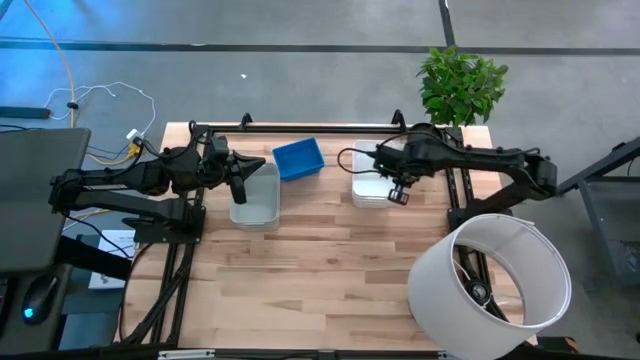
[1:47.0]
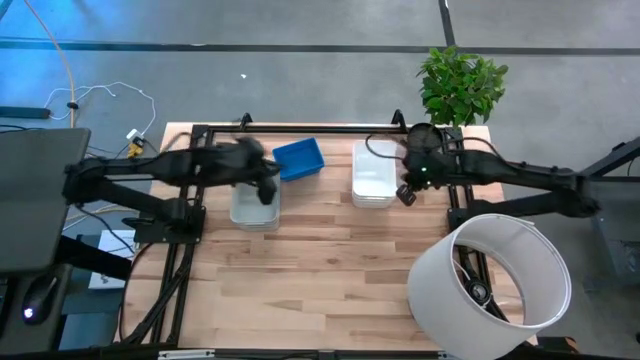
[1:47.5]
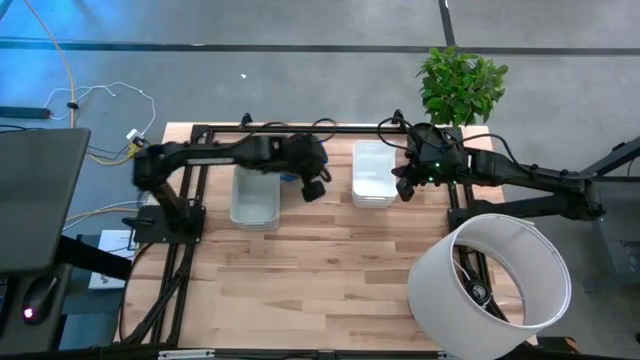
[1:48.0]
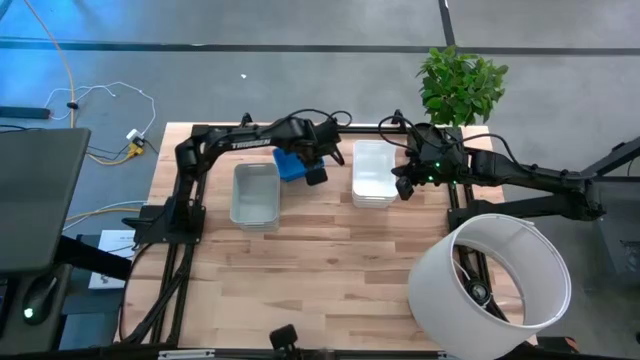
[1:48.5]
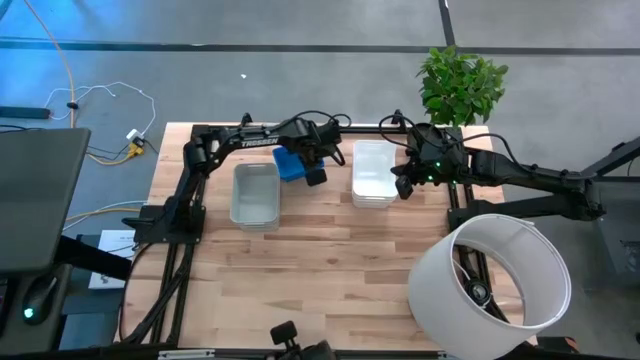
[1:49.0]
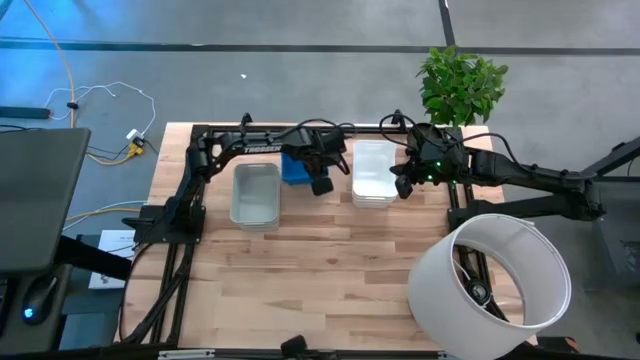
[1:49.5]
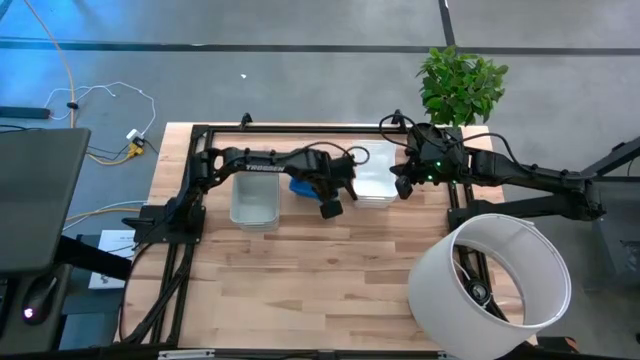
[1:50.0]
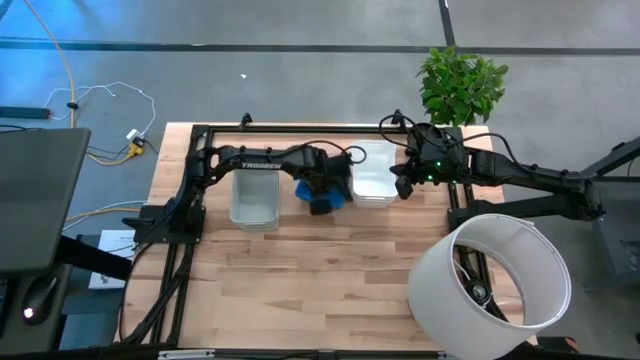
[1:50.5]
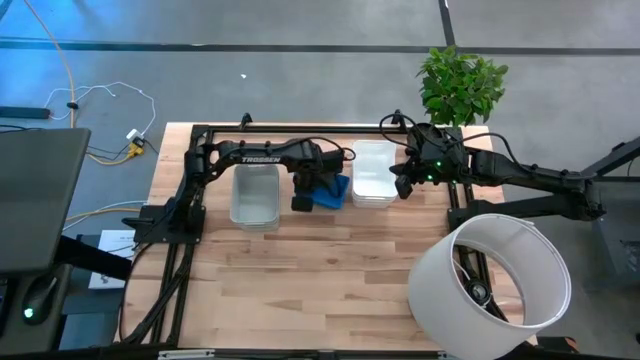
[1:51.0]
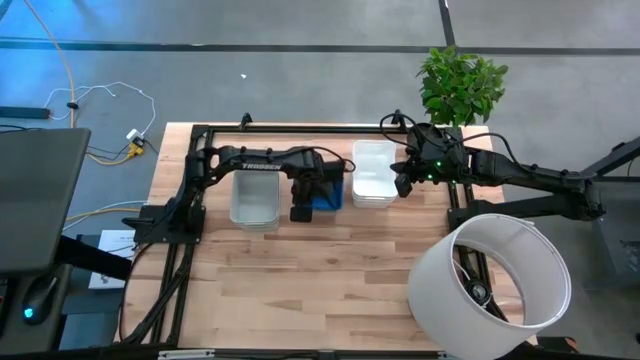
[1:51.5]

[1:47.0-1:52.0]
Adjust the blue bins

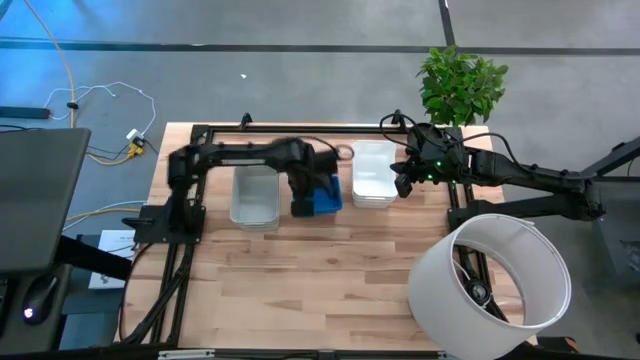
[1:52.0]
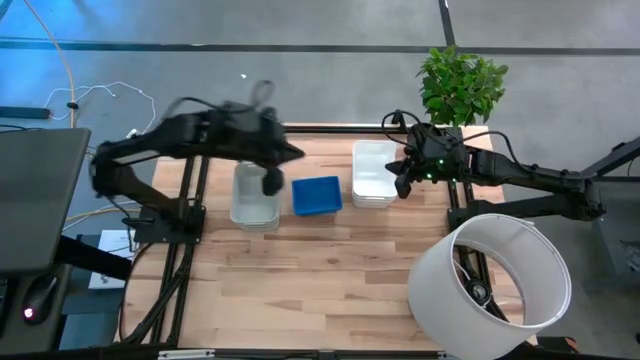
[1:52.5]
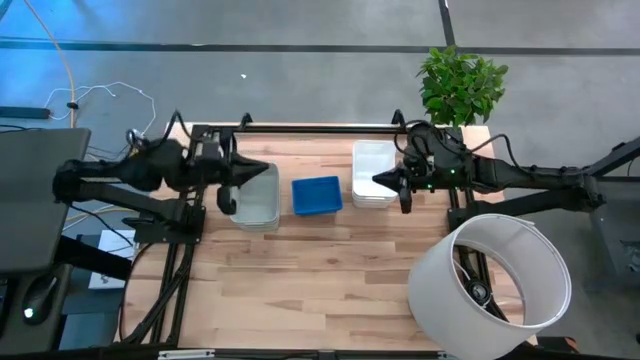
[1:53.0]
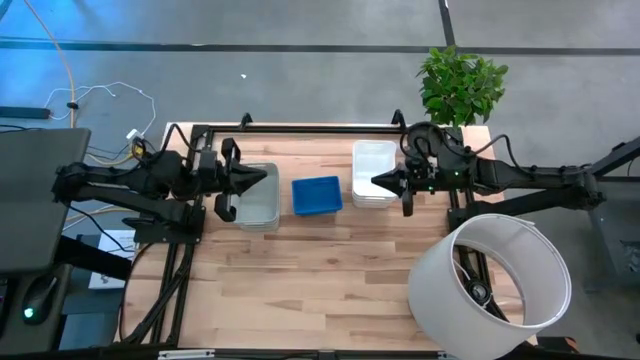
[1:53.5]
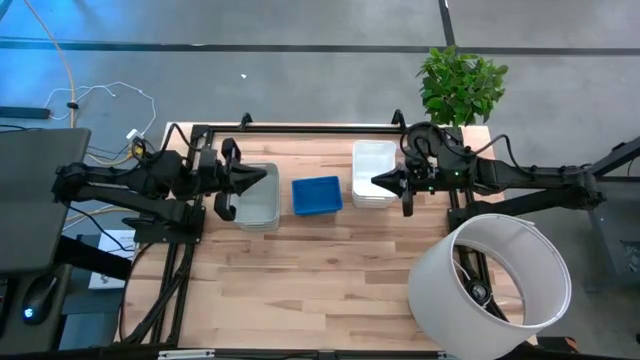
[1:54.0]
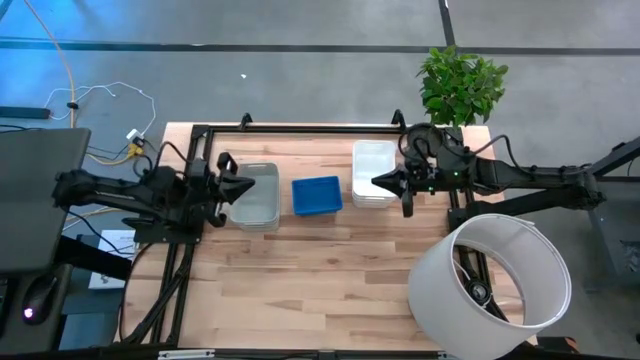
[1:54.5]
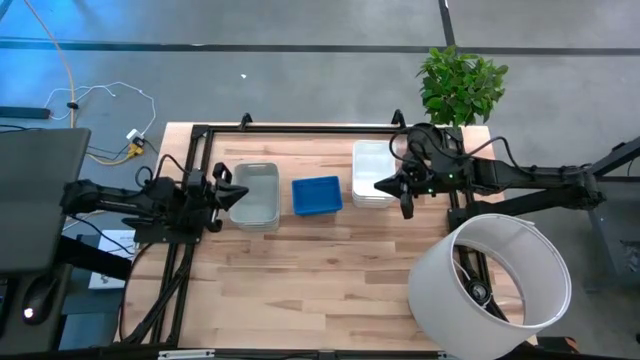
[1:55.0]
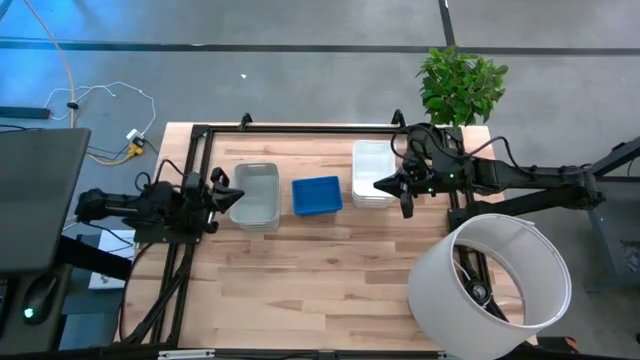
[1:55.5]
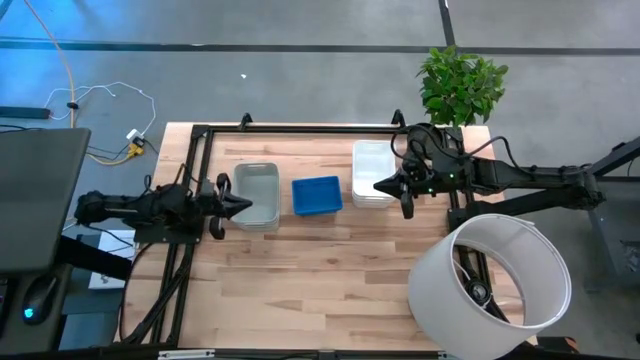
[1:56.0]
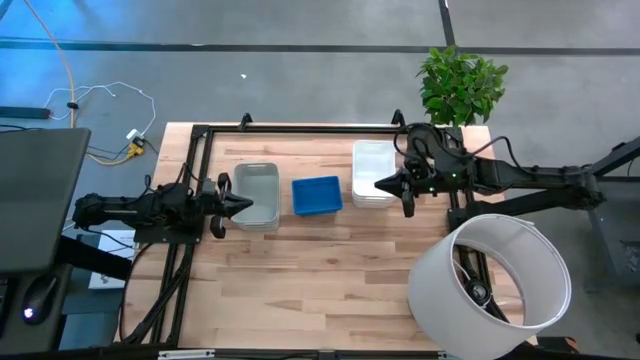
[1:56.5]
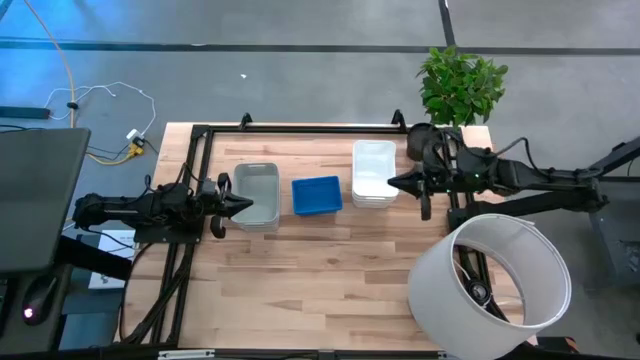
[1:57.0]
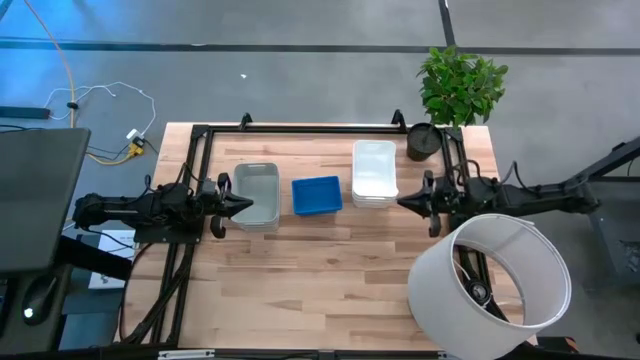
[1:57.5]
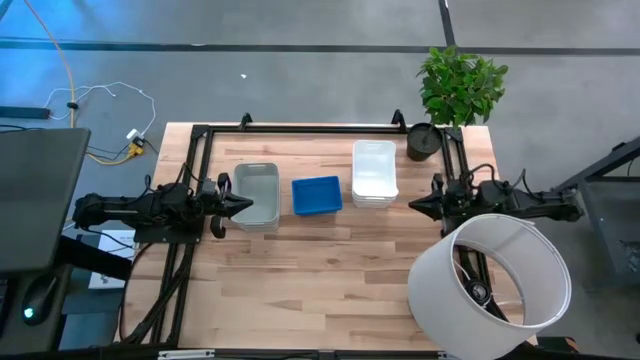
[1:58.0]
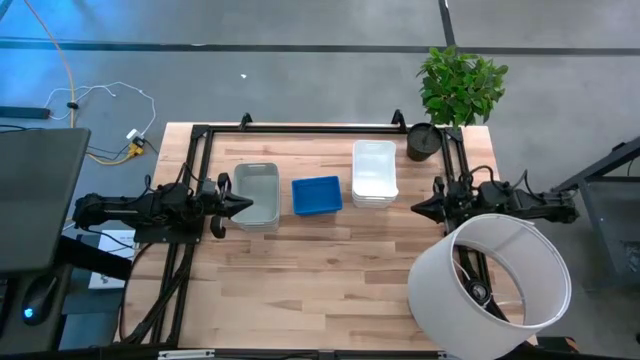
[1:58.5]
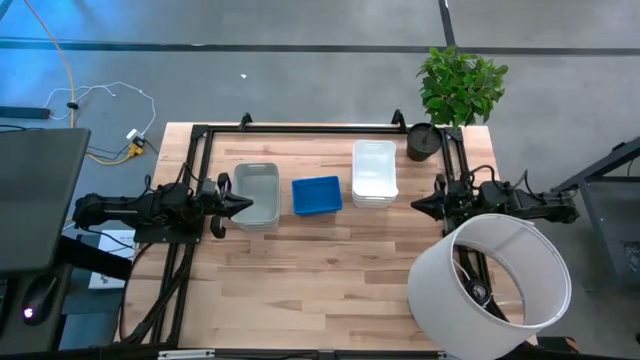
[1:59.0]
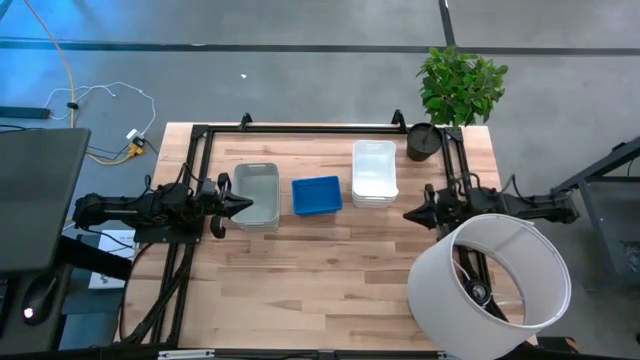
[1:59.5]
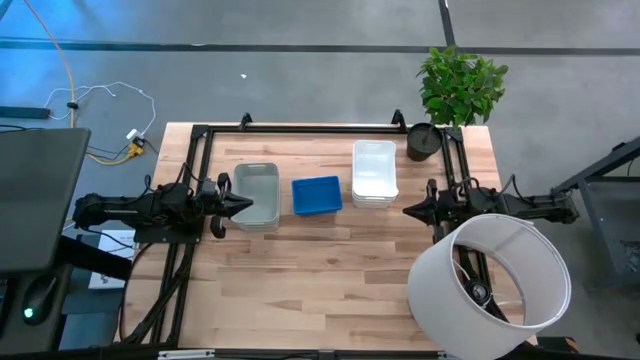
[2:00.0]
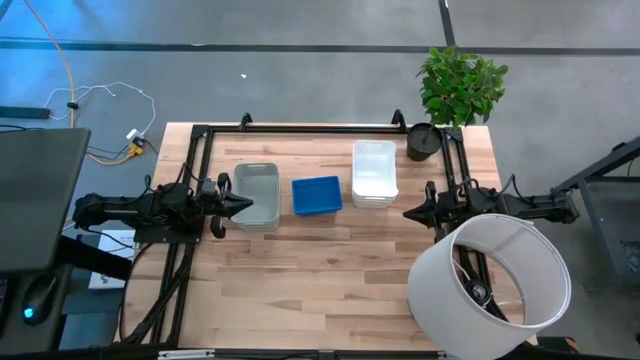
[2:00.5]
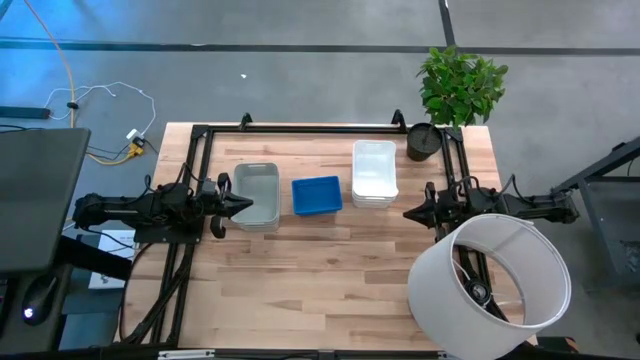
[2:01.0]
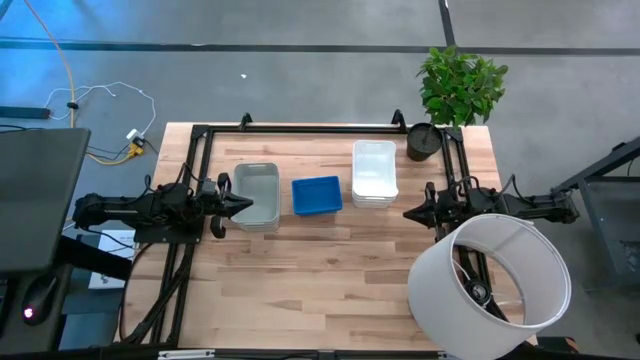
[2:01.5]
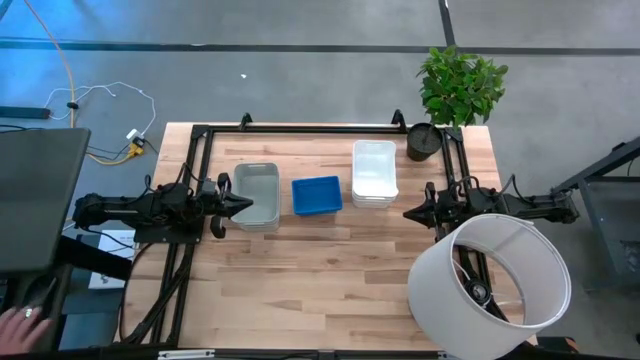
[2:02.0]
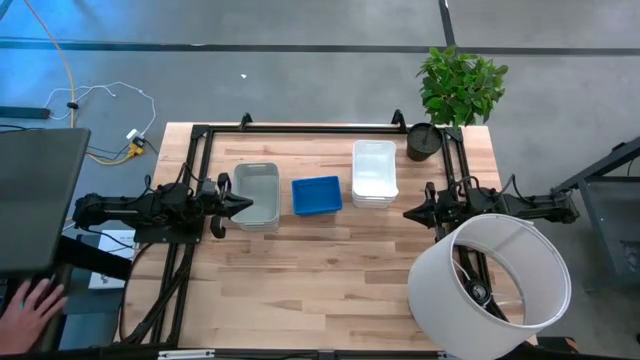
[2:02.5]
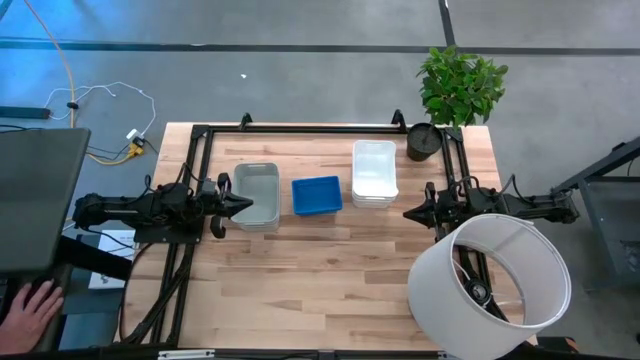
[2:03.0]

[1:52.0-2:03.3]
Return to Home Position
